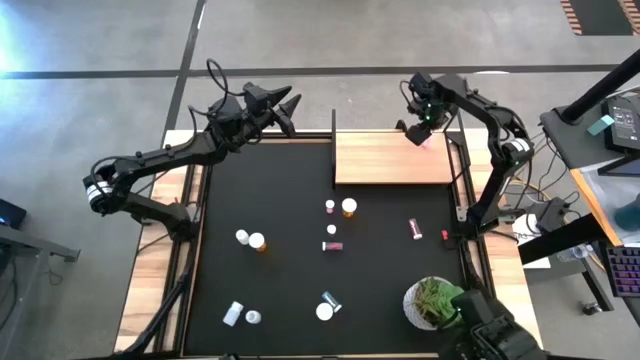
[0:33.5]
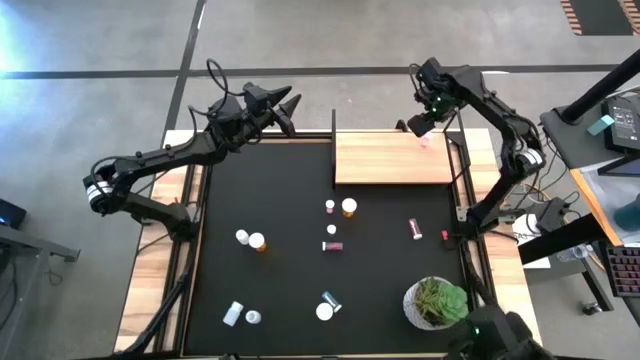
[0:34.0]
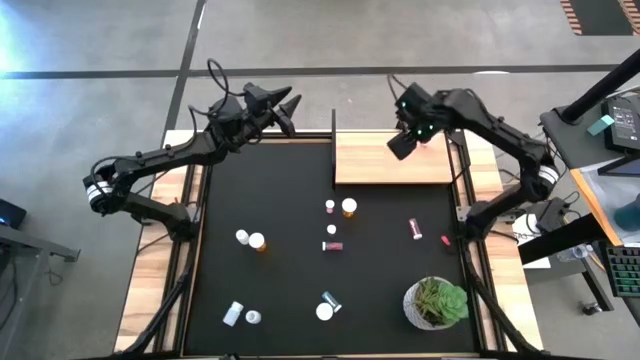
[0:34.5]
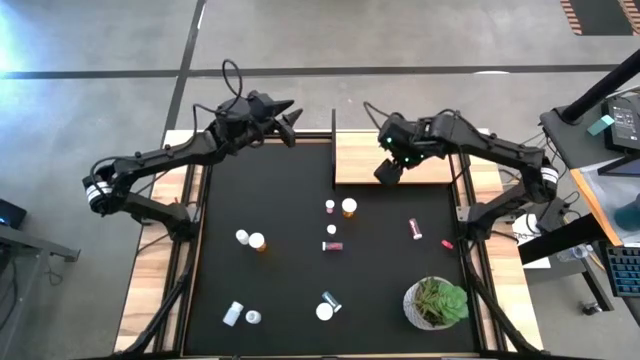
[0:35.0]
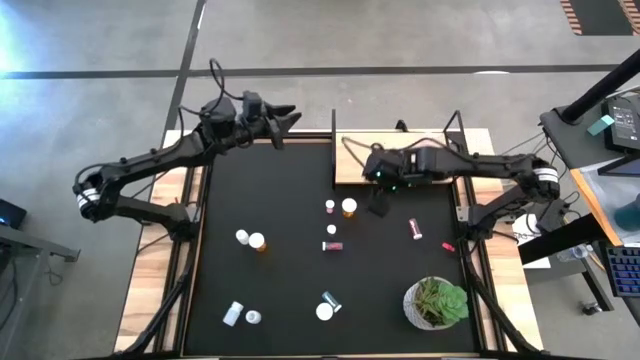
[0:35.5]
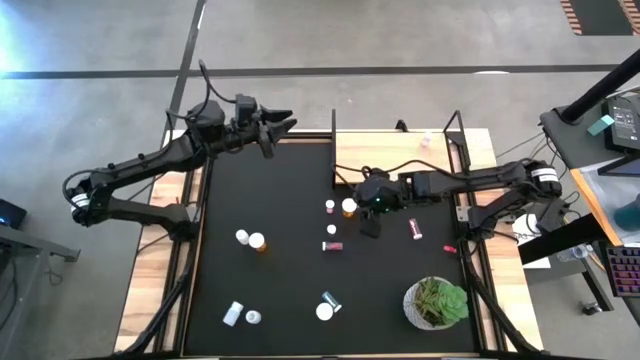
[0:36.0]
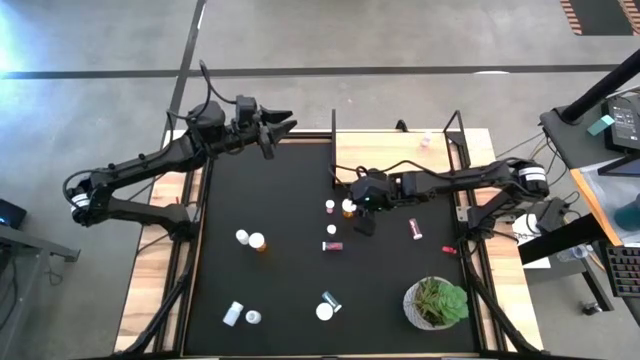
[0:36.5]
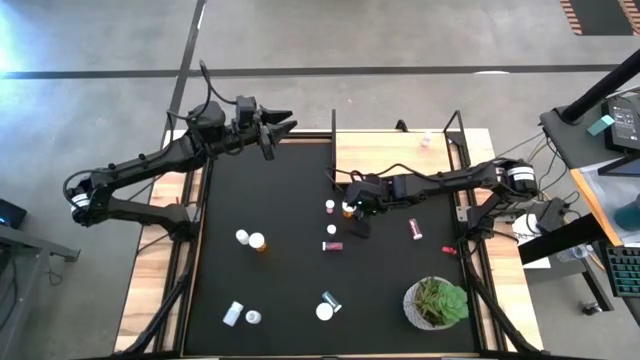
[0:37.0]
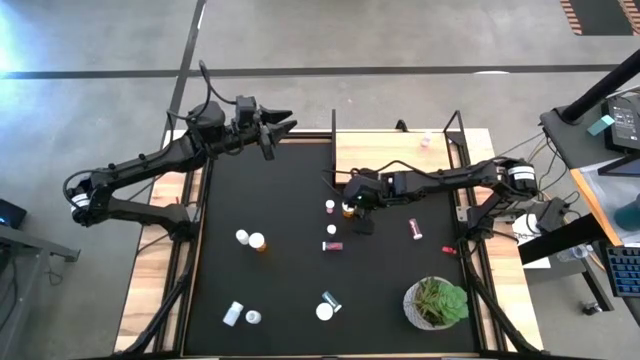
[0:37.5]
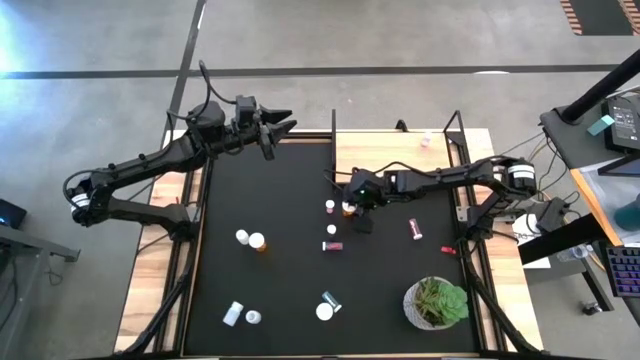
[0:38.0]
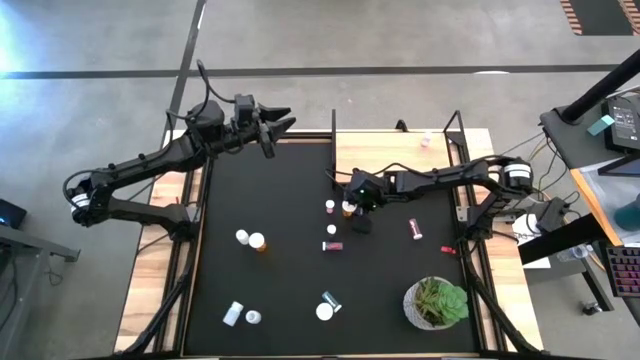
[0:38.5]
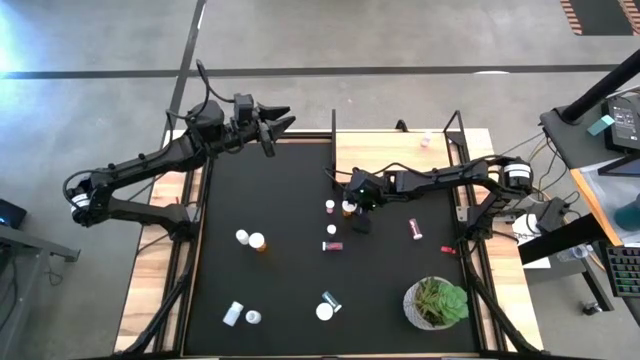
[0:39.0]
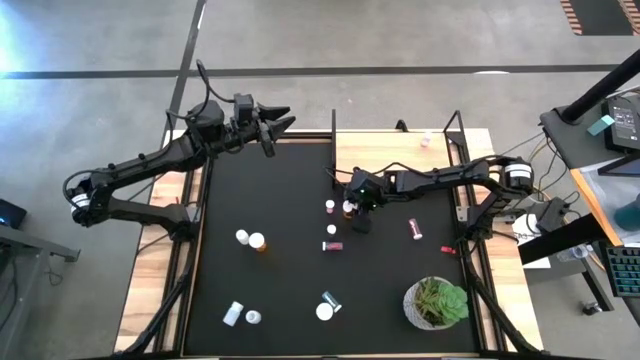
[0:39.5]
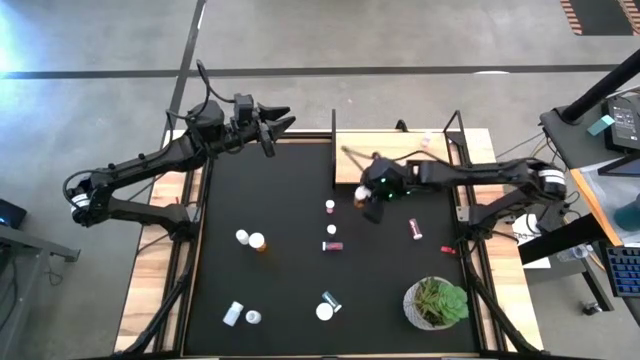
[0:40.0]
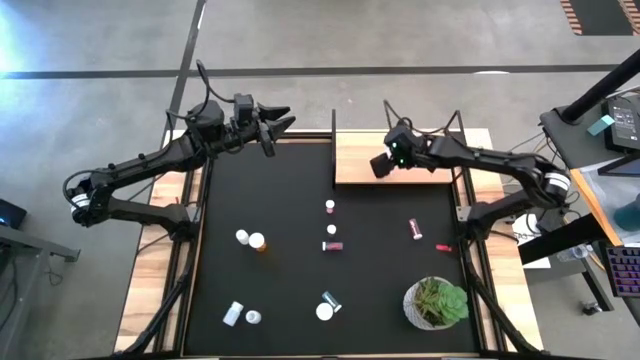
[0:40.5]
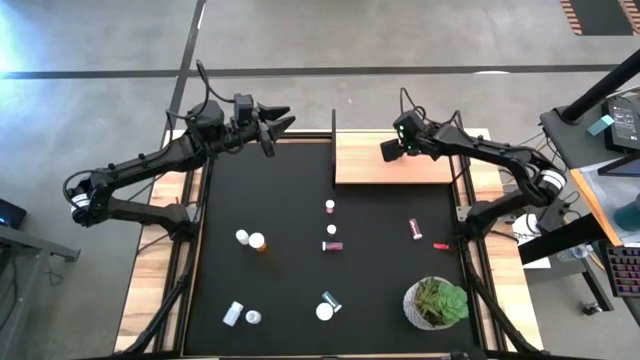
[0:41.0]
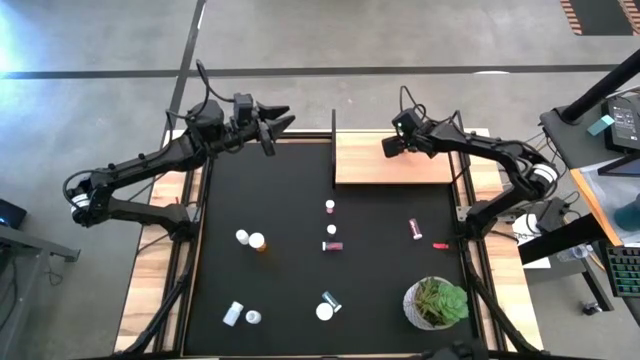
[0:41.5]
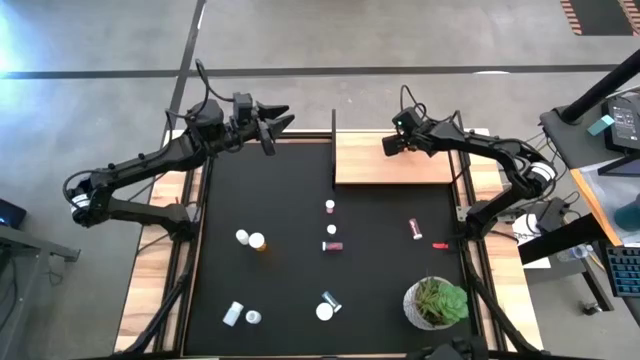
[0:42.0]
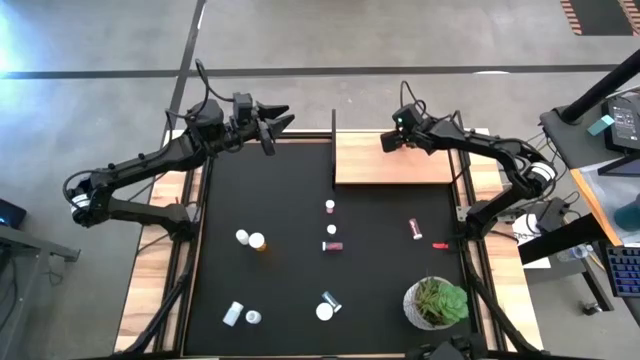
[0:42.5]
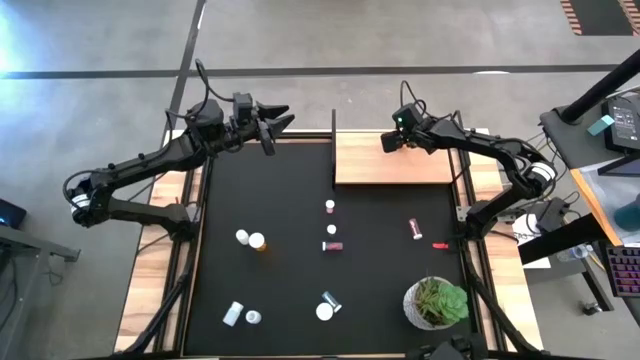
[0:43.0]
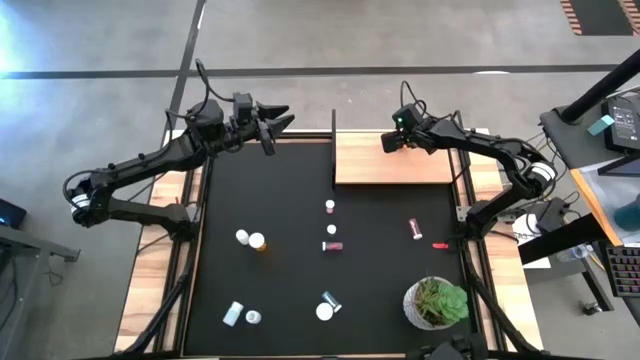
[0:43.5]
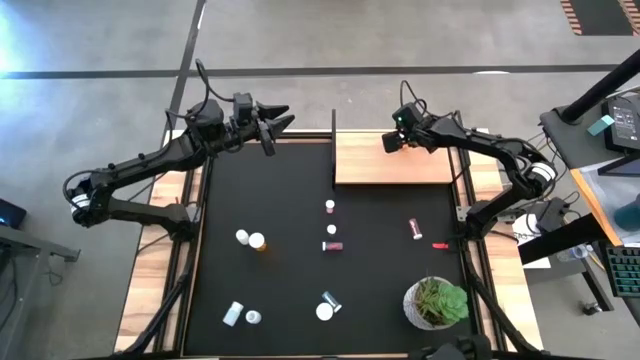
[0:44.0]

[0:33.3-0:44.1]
Task: Pick and place medicine bottles onto shelf by color
Put the top orange pill bottle on the shelf

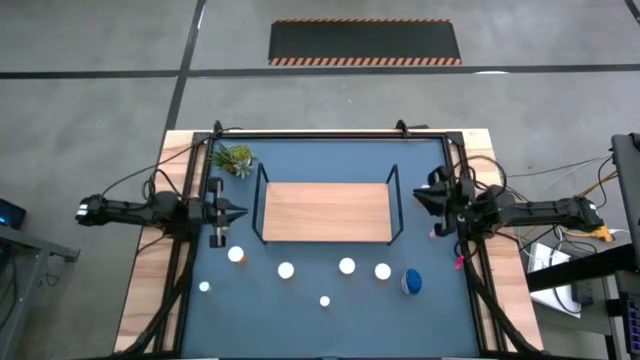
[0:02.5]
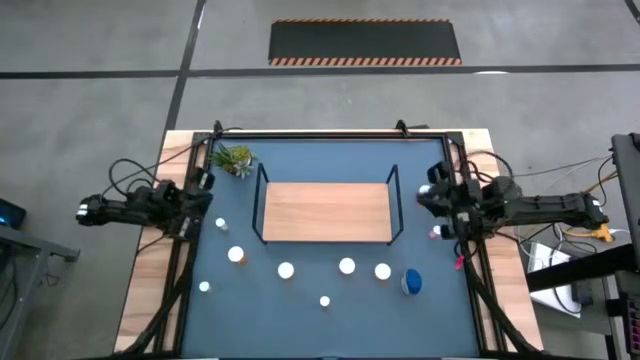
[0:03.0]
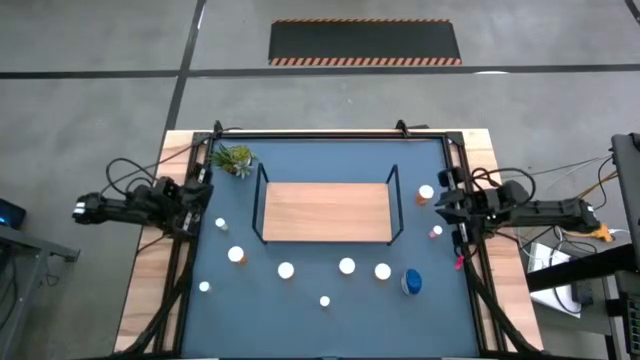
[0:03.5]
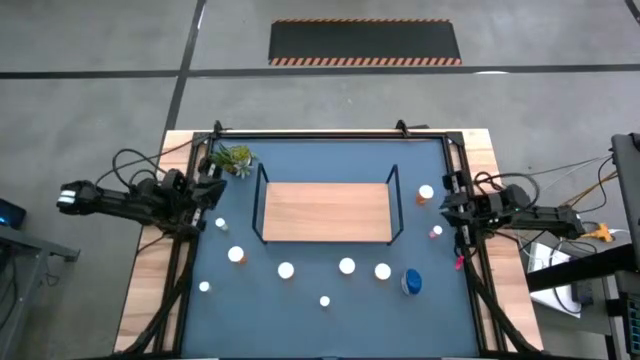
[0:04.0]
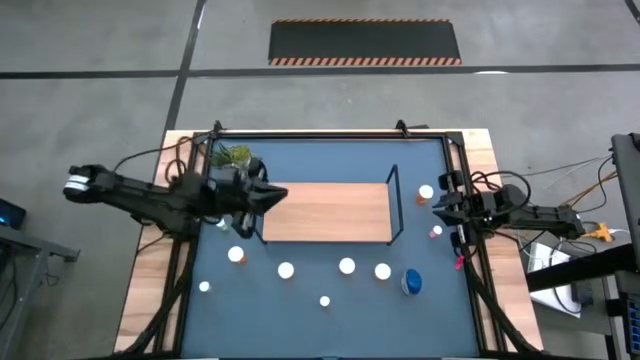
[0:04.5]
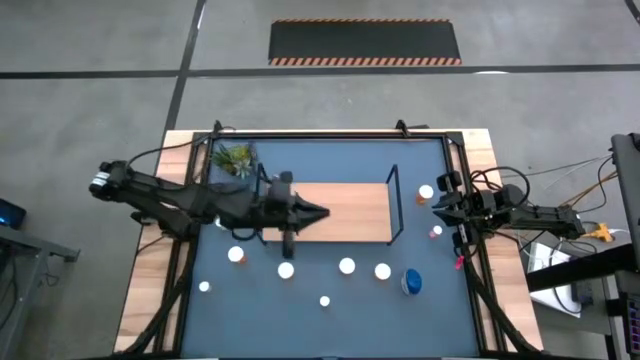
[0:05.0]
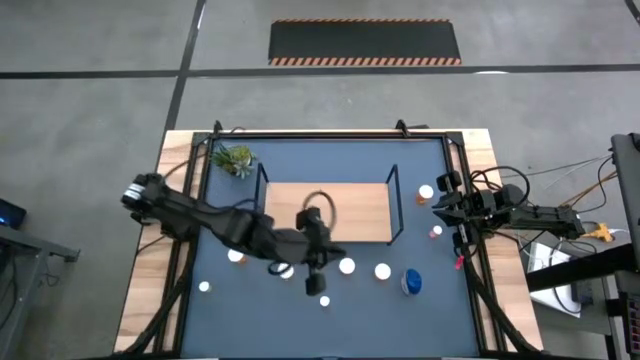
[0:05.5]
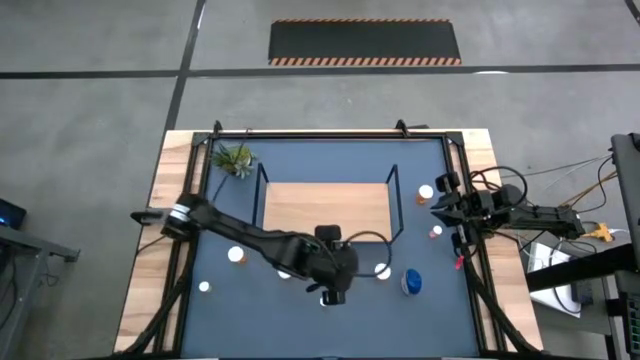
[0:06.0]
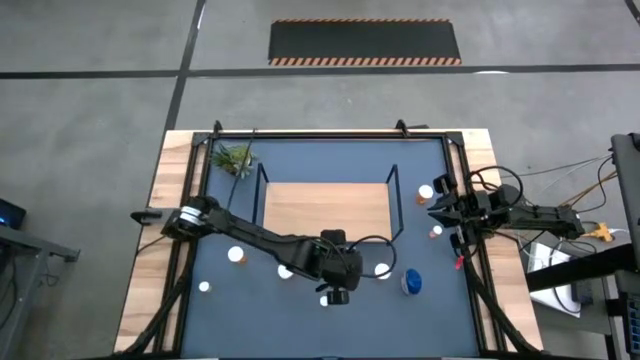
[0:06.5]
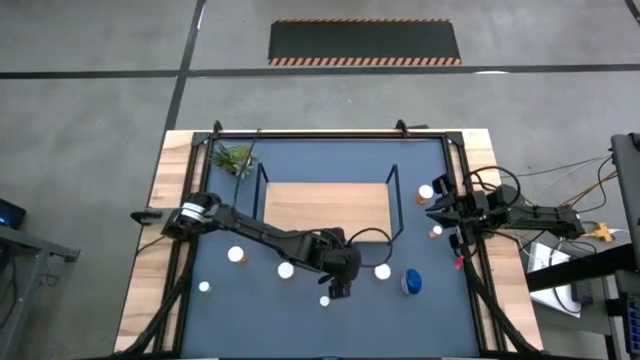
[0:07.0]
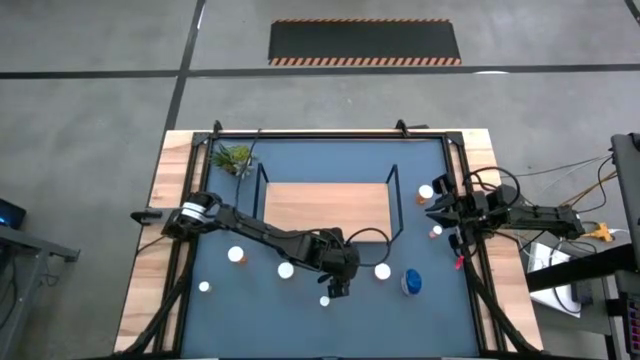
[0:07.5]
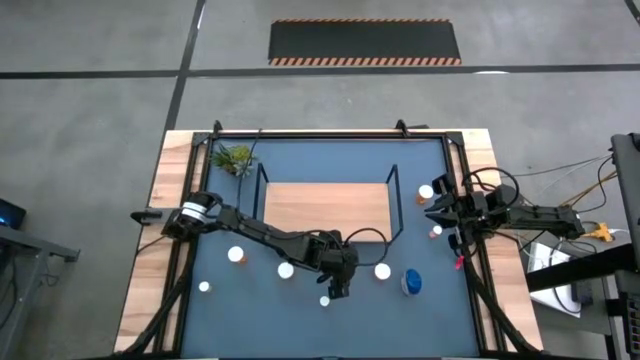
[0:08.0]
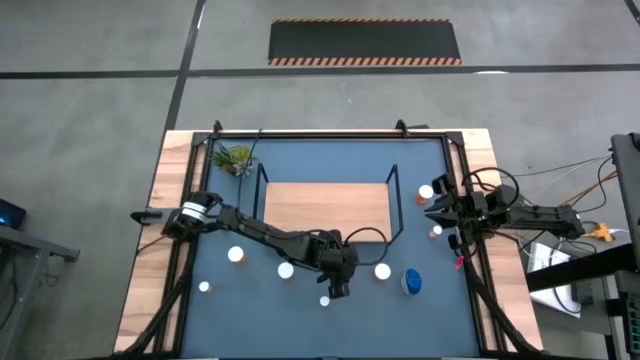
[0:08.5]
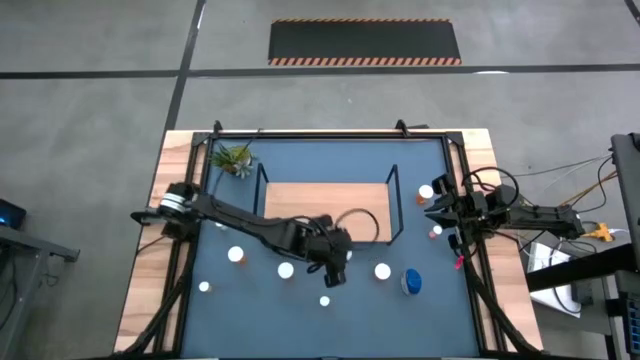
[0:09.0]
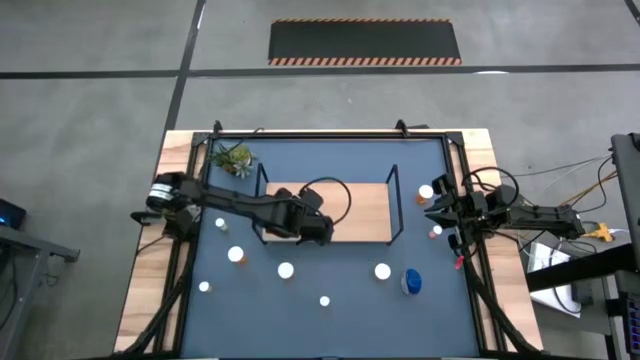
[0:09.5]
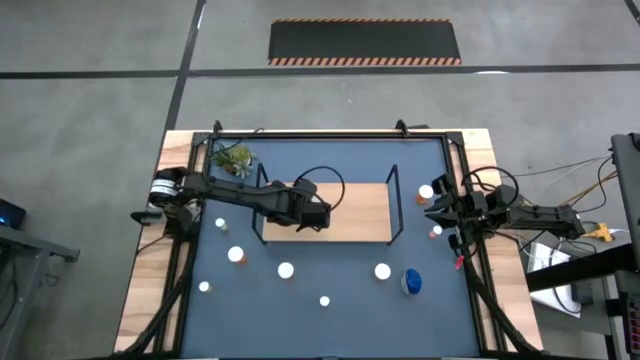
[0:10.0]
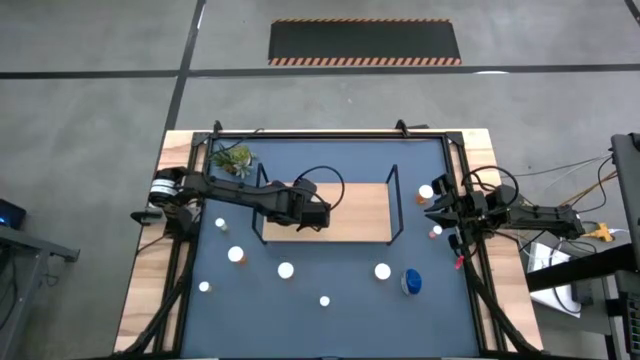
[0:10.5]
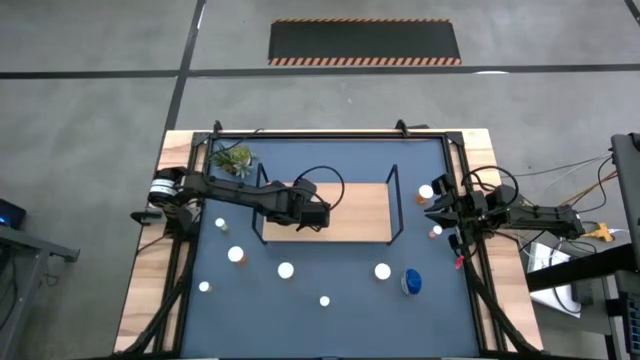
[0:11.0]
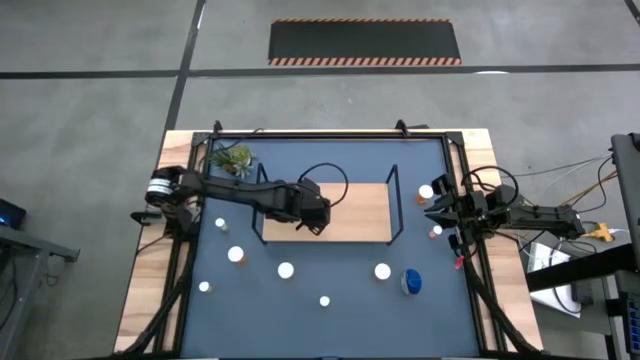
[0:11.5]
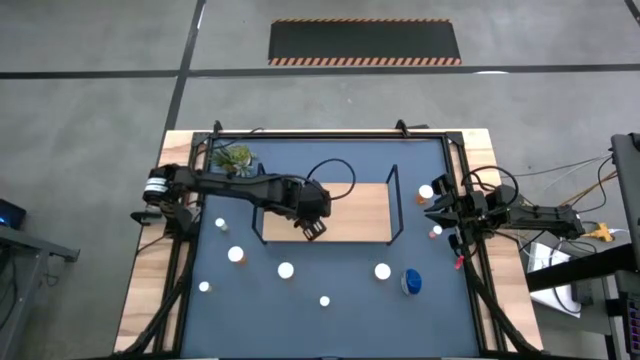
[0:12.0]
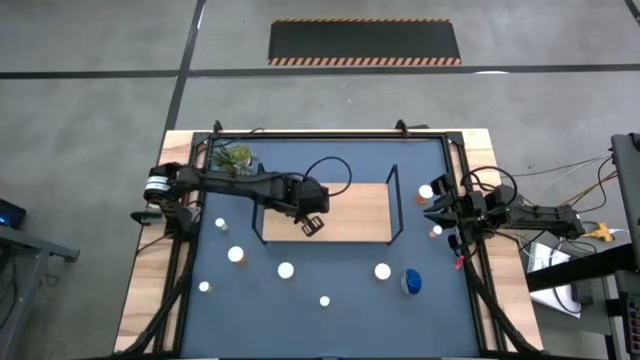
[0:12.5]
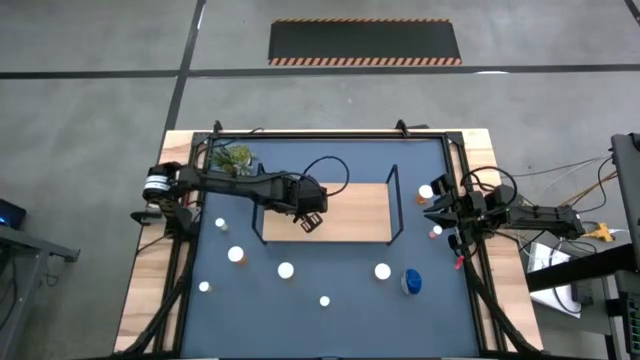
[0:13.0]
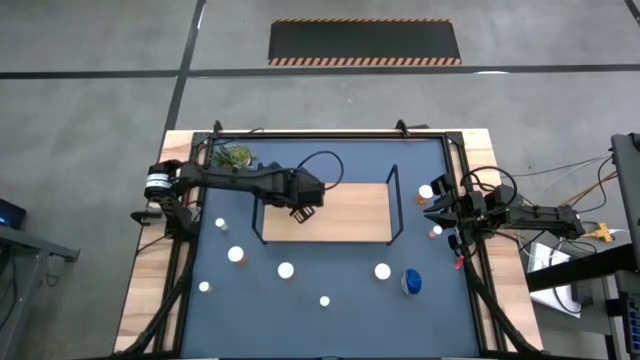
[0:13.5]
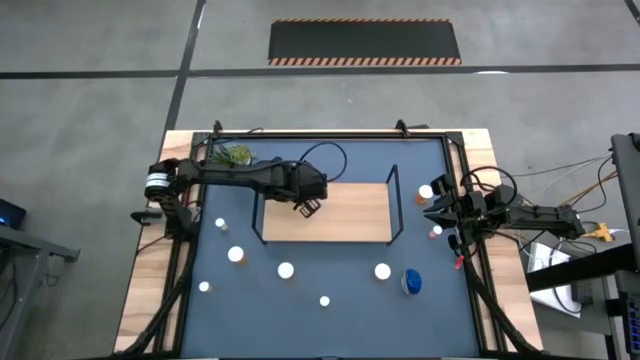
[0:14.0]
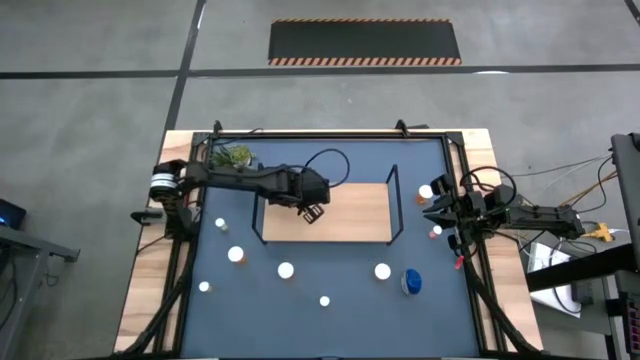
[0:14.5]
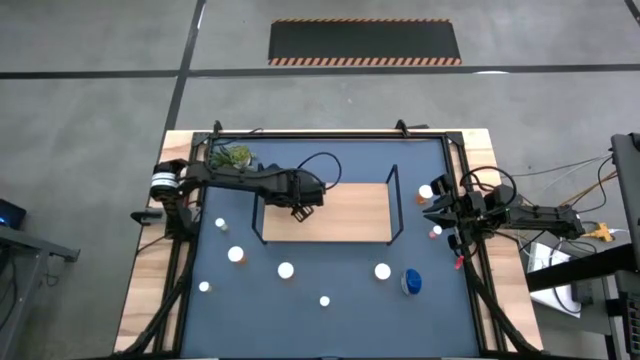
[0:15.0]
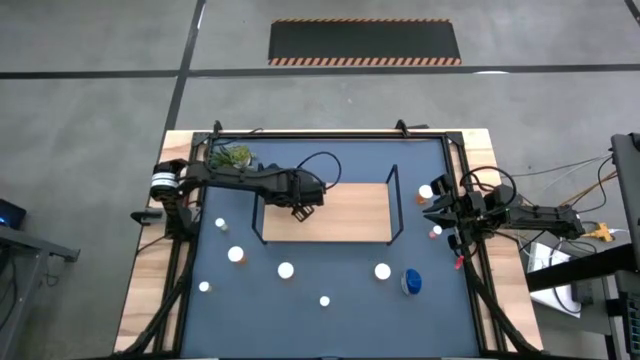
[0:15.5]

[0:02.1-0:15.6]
Task: Pick and place medicine bottles onto shelf by color
Put the big orange pill bottle on to the shelf
